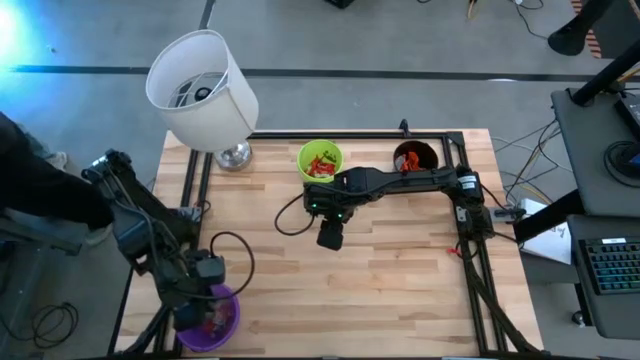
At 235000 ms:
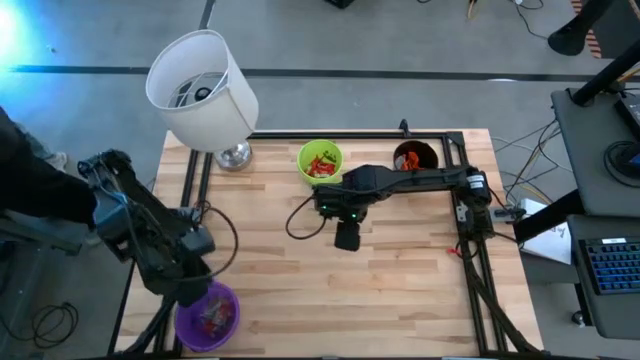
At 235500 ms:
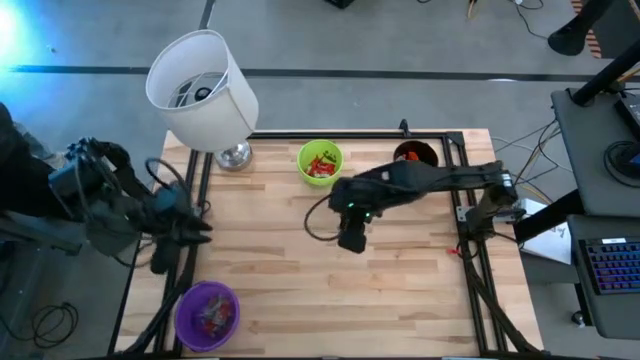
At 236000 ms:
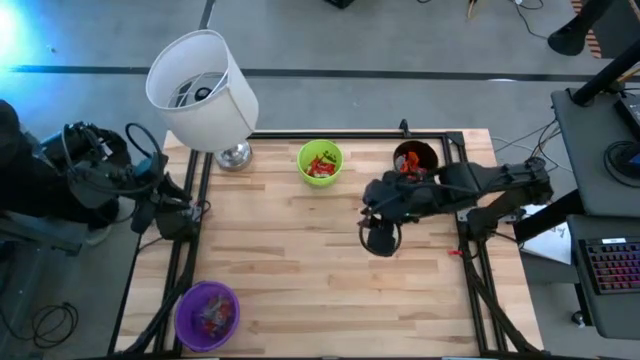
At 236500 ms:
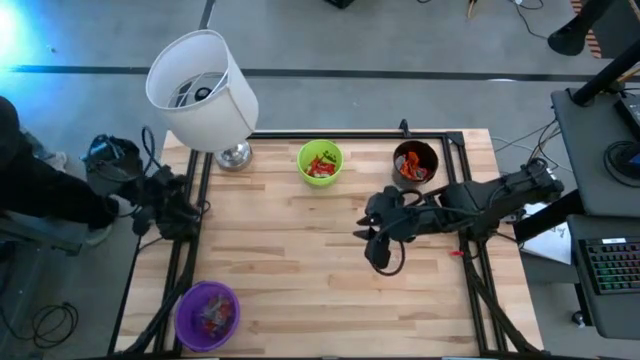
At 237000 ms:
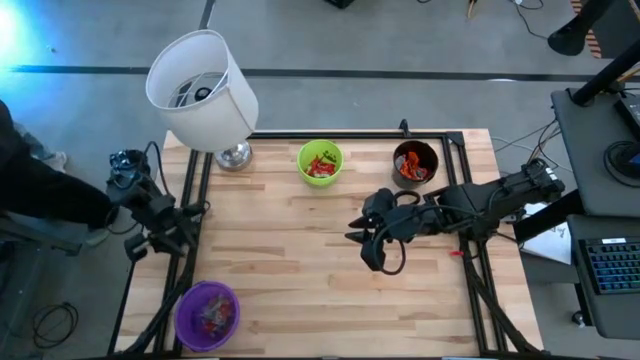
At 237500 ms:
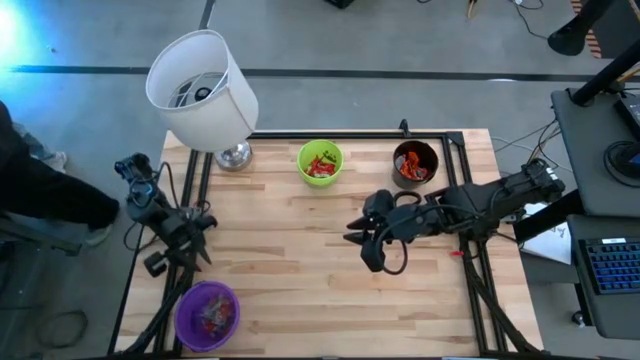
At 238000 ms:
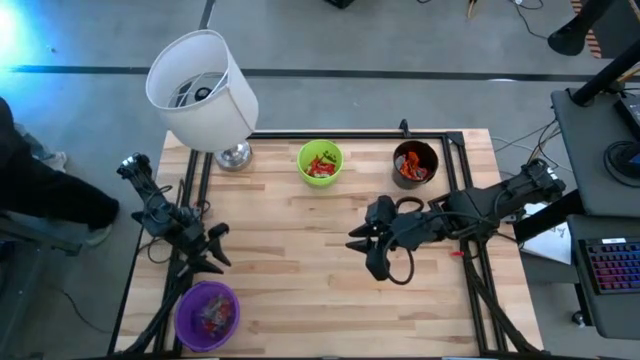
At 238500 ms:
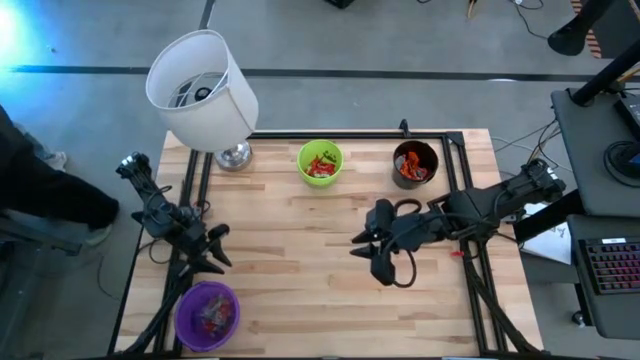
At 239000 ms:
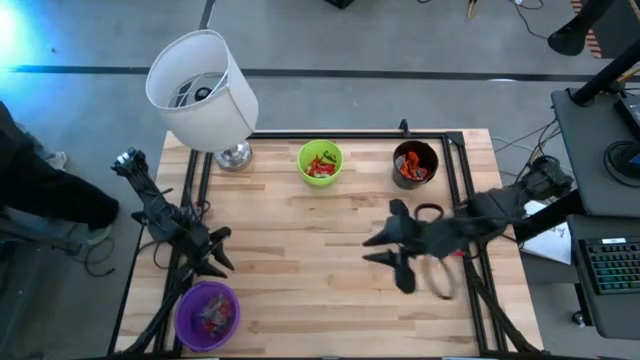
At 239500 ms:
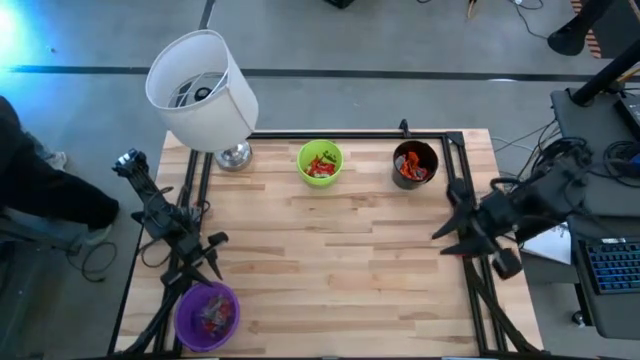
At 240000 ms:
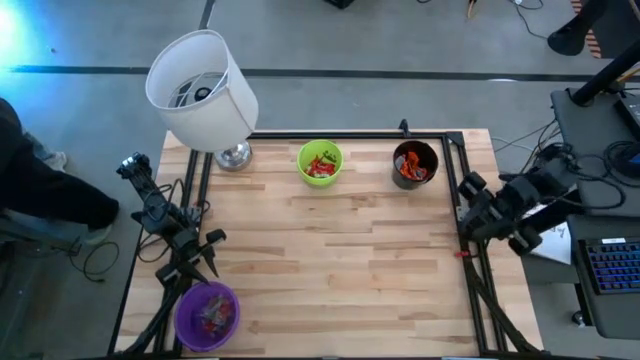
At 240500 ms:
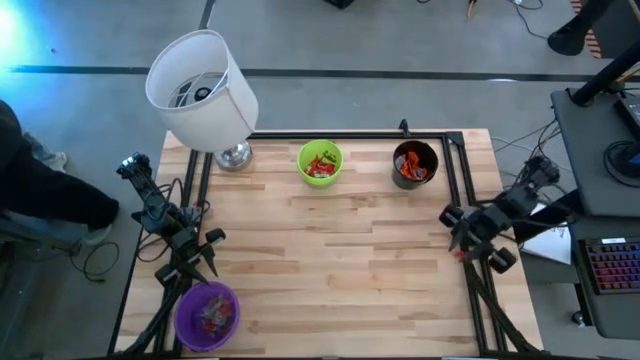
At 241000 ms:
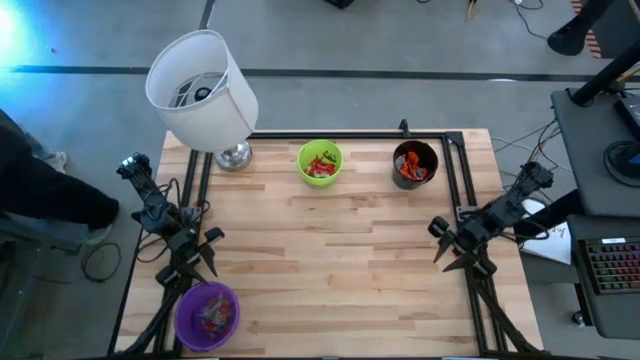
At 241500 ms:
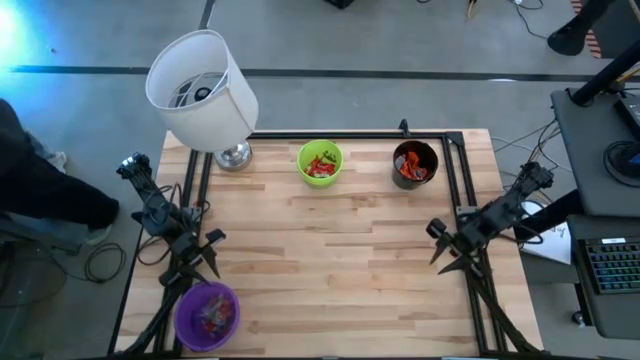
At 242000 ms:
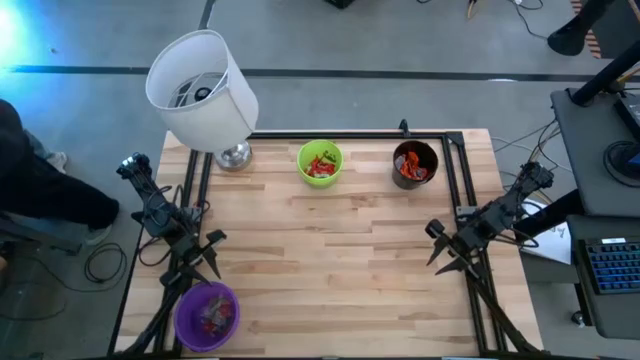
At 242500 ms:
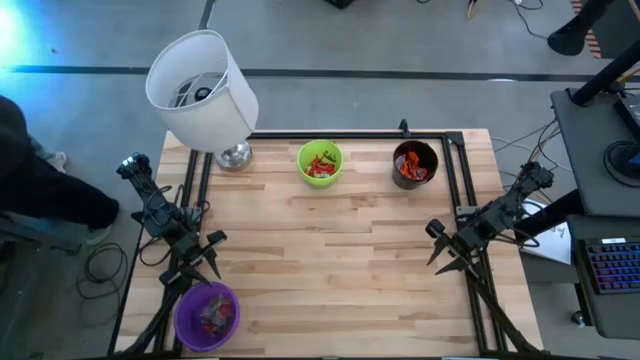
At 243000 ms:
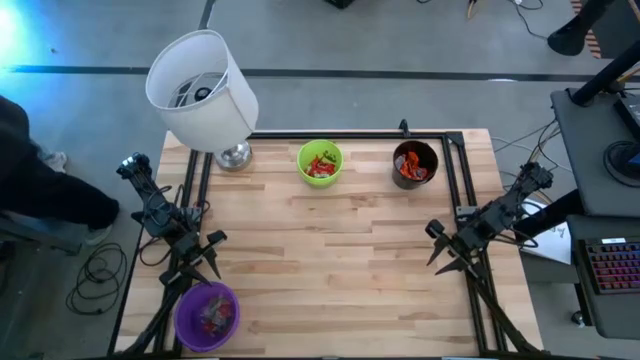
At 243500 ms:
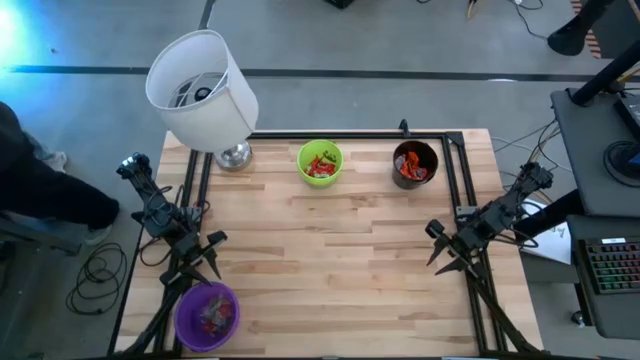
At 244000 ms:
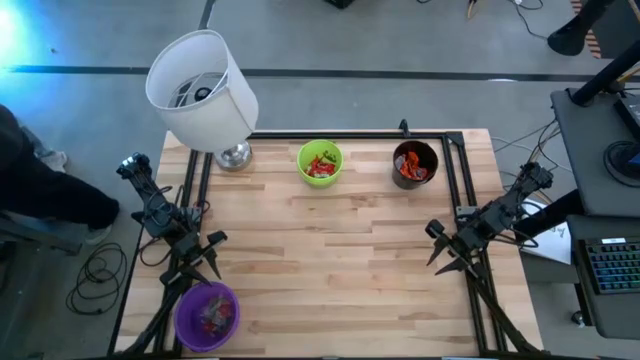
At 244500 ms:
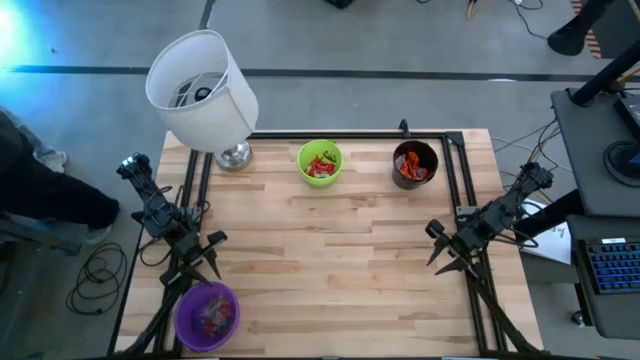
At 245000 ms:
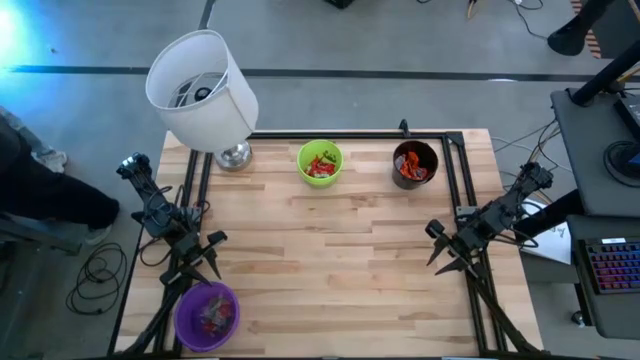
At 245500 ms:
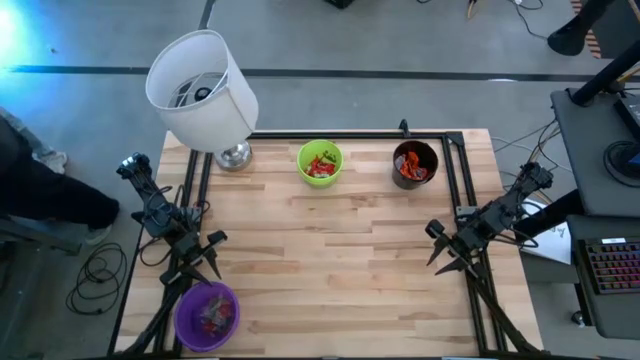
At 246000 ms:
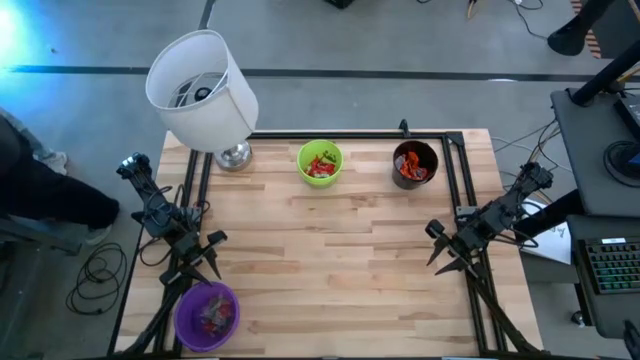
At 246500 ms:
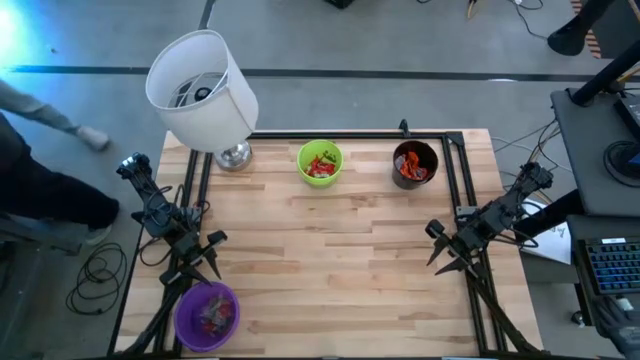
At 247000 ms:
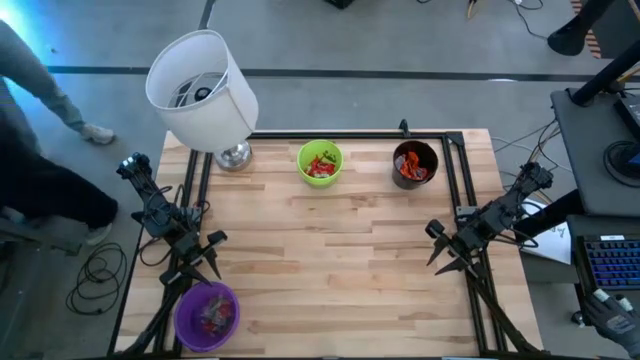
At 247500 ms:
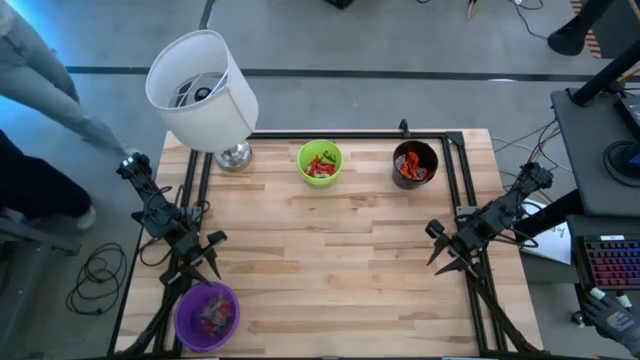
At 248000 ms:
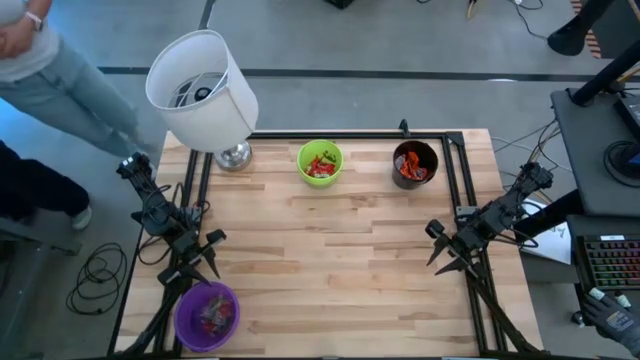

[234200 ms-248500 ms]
Task: Sort candy
Return to Home Position

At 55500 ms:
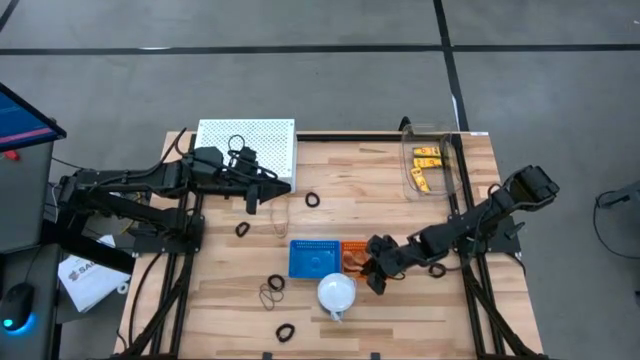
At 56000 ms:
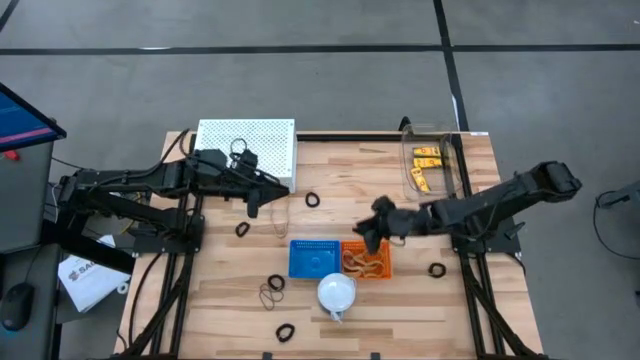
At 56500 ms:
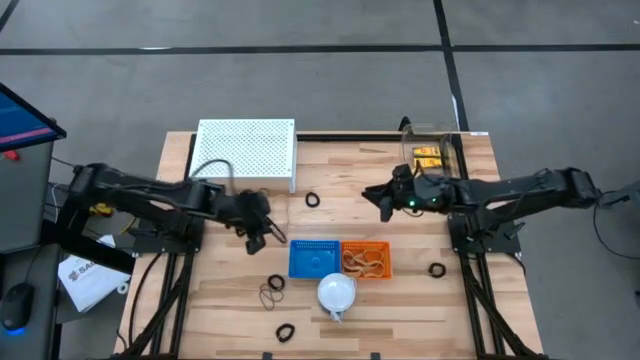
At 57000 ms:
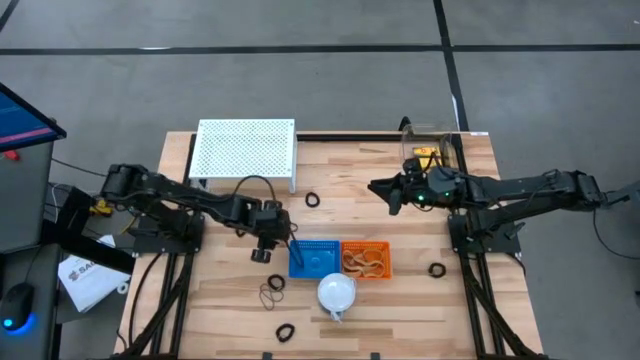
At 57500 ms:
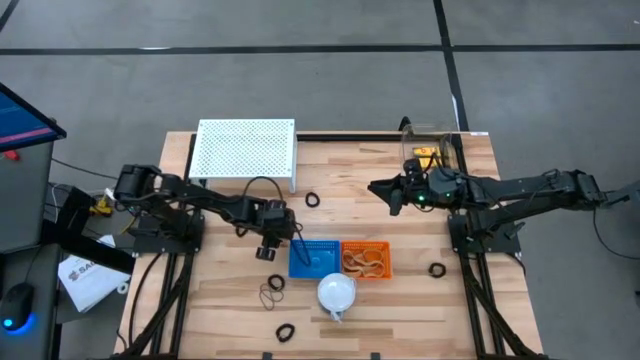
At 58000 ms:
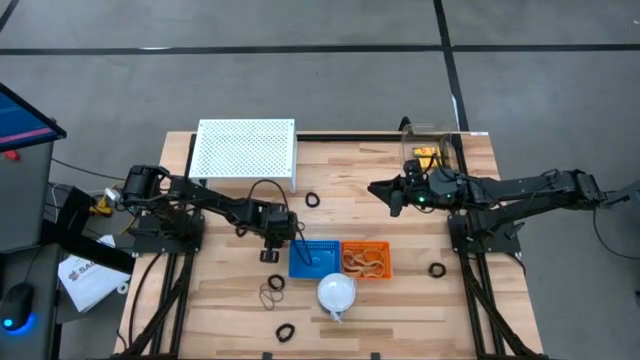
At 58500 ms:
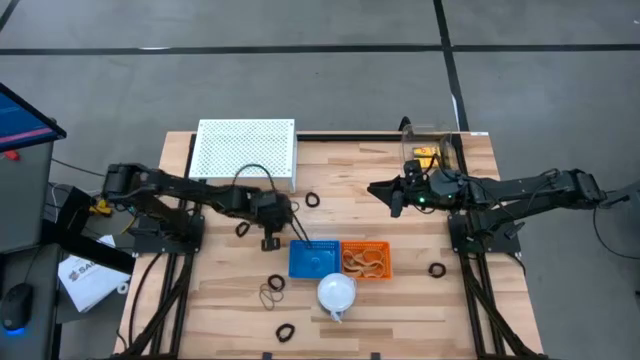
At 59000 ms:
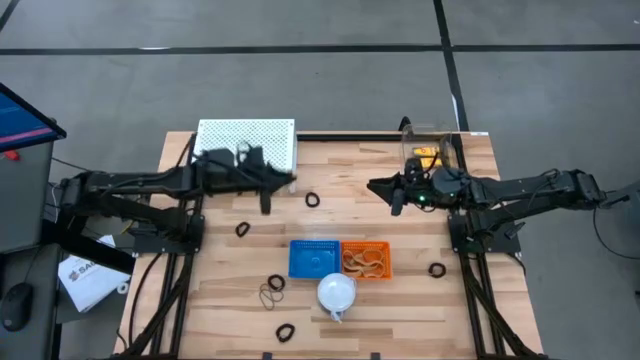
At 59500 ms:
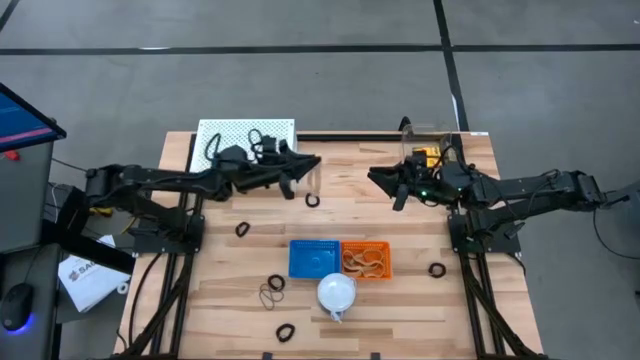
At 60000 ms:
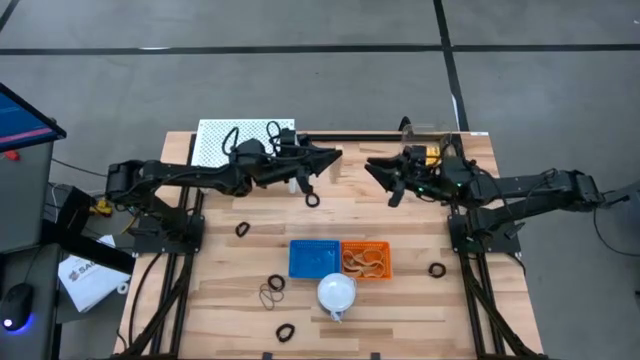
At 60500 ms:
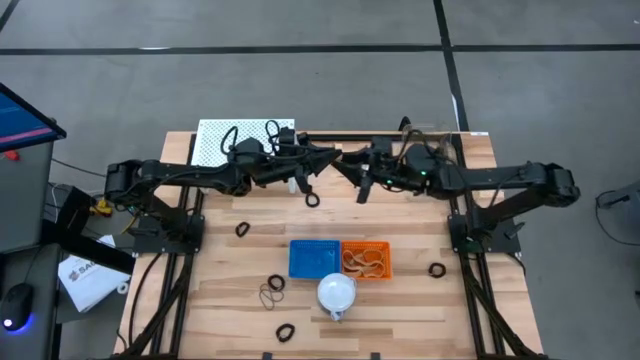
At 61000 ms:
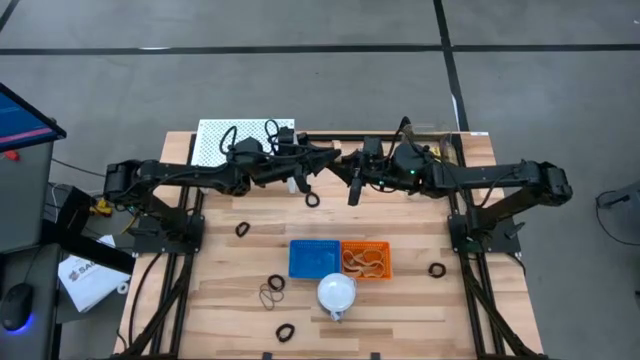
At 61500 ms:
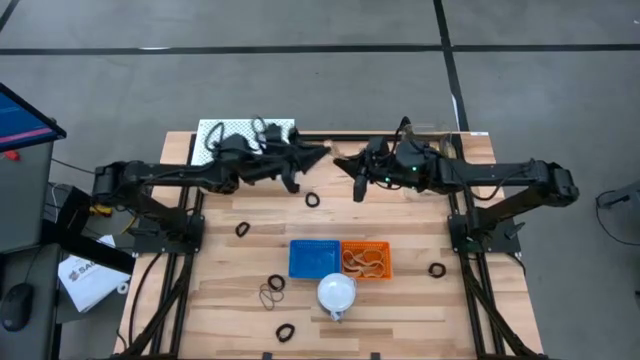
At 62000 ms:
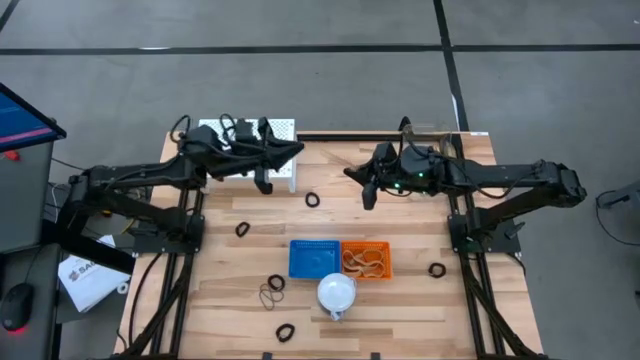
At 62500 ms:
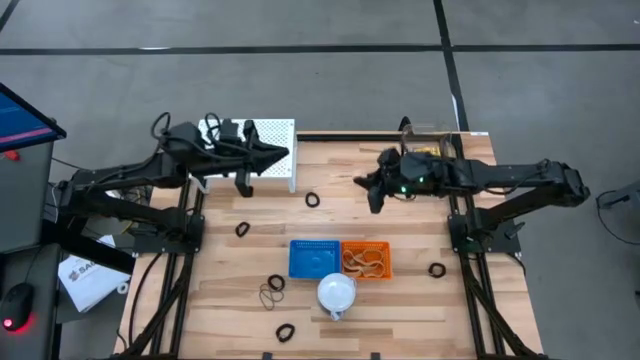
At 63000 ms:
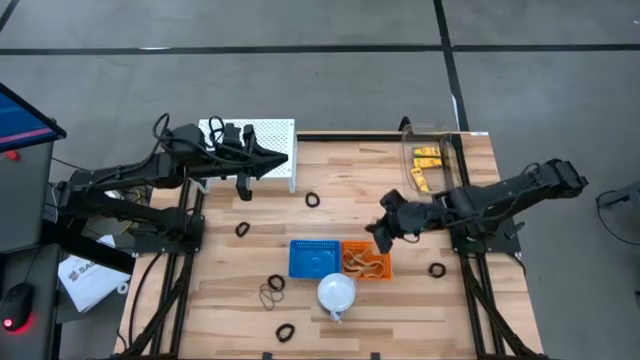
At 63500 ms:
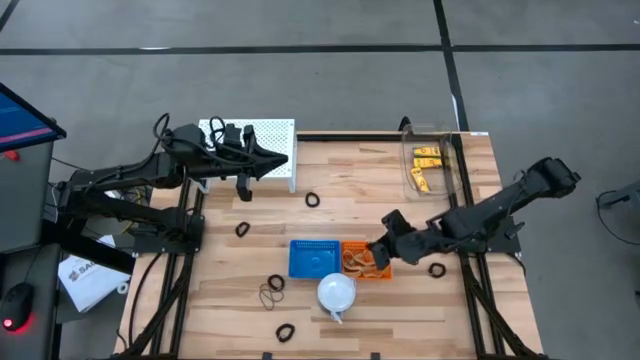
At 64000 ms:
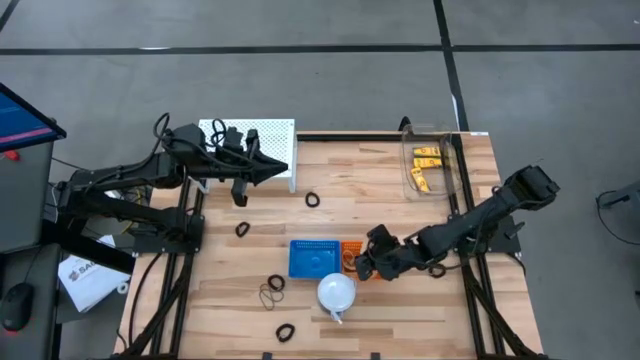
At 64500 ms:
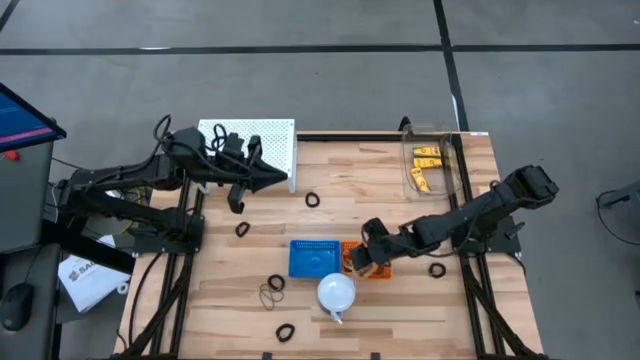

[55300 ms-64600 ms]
Task: Pick & Place Office Desk Supplies
Put the brown rubber band into the orange basket
